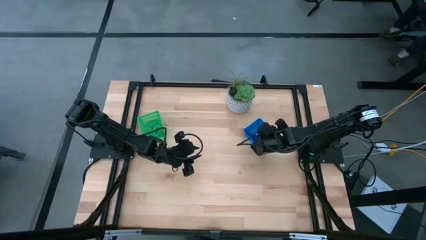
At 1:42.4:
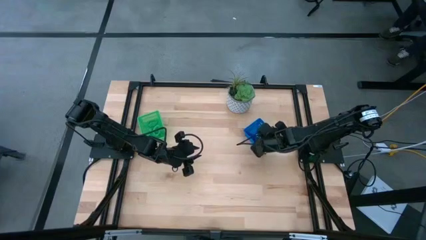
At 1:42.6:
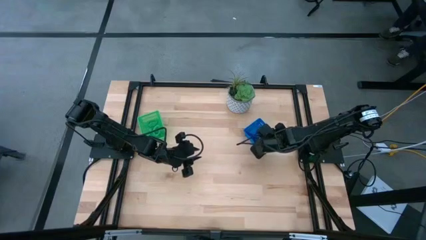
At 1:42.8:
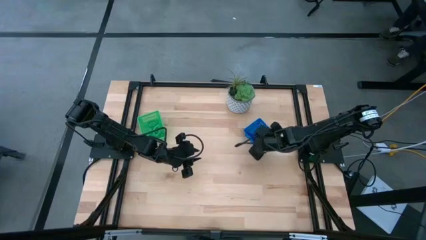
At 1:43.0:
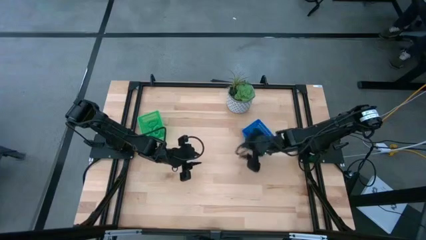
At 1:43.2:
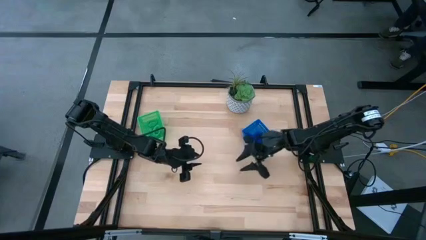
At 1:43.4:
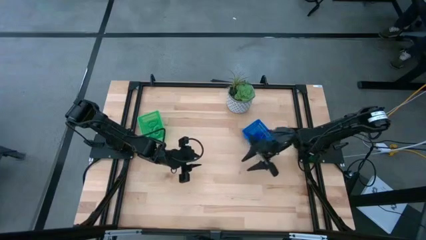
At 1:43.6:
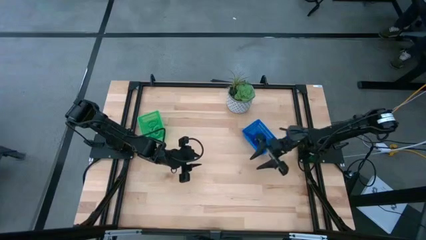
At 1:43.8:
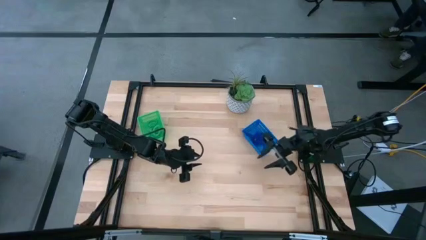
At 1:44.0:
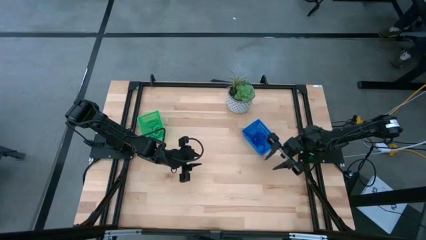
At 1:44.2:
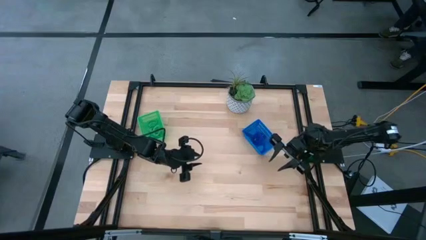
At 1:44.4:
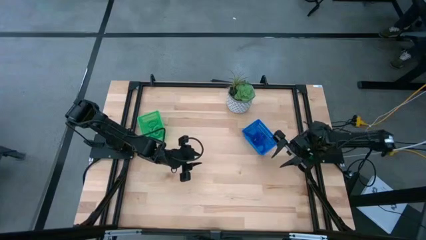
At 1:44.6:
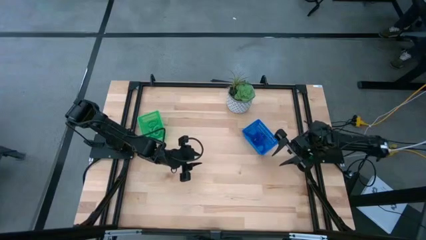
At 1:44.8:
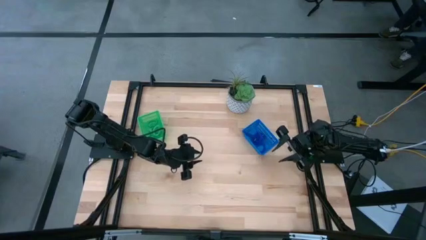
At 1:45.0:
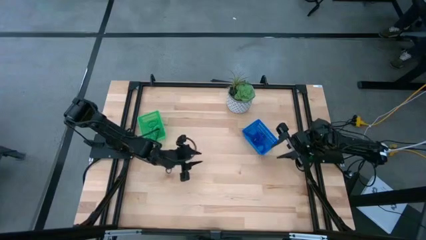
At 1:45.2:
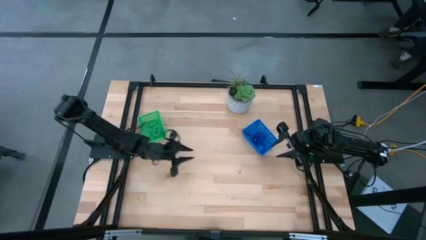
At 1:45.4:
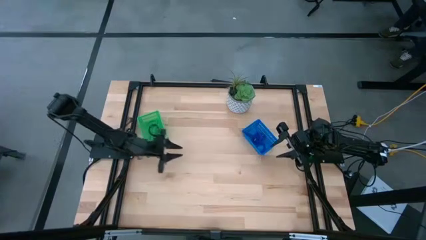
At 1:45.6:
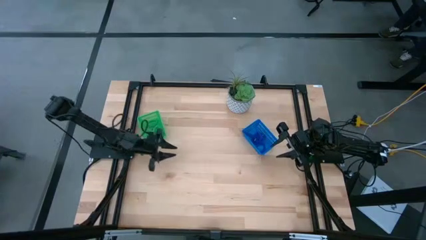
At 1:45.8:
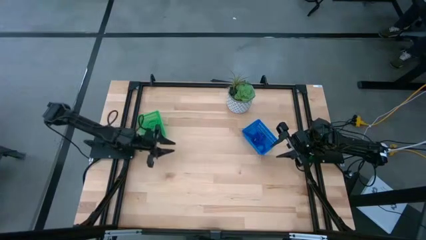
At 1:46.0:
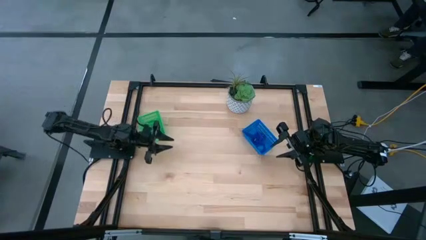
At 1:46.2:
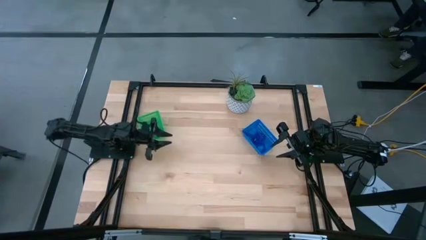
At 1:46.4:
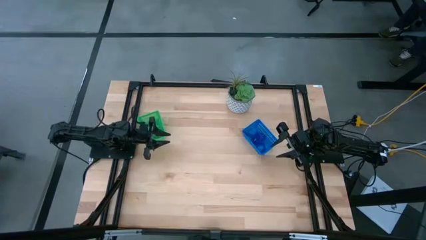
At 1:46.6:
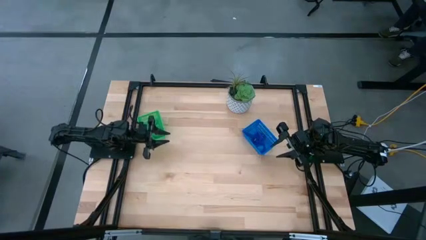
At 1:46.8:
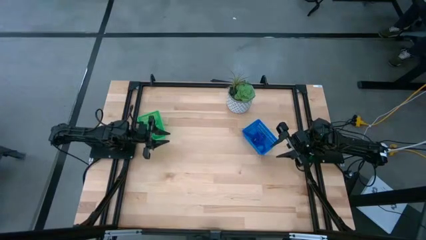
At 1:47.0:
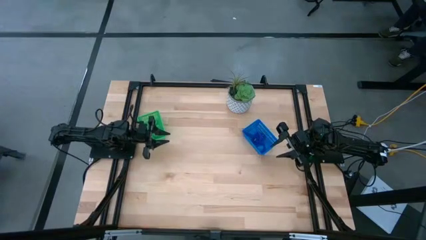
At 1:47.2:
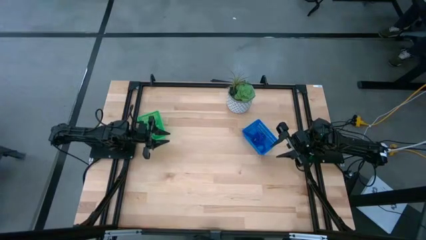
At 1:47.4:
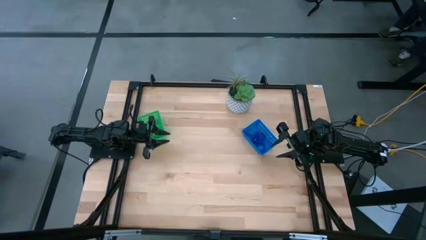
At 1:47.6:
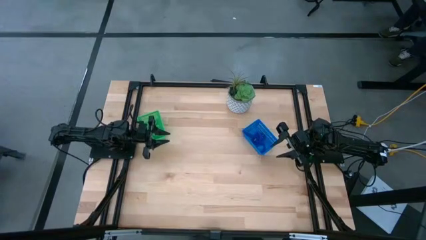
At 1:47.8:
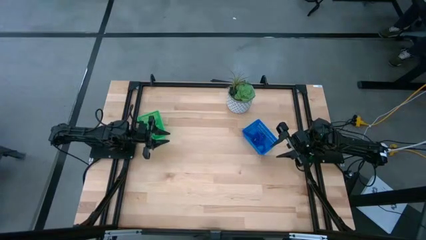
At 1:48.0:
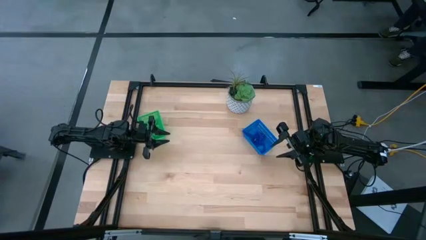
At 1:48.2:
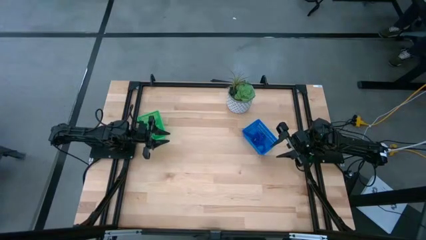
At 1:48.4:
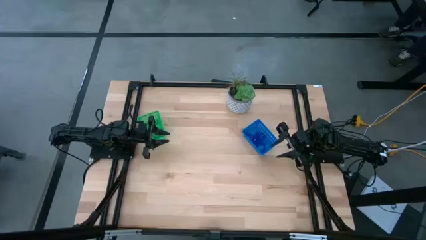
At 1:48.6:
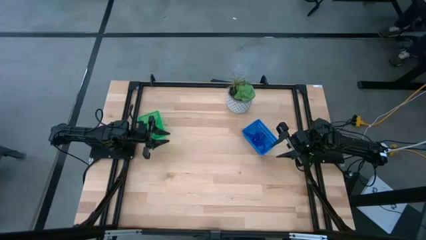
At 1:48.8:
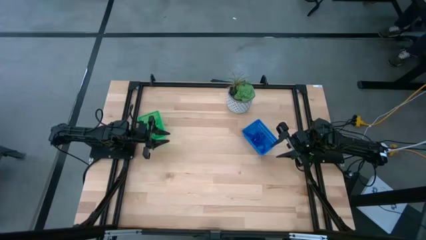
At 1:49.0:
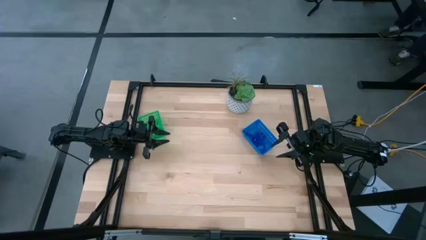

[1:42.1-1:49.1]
Task: Sort spring keychains
Return to Home Position

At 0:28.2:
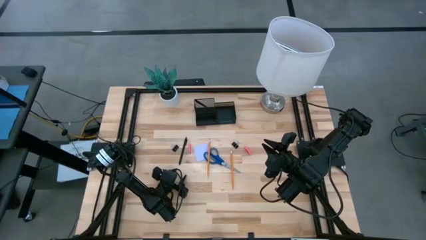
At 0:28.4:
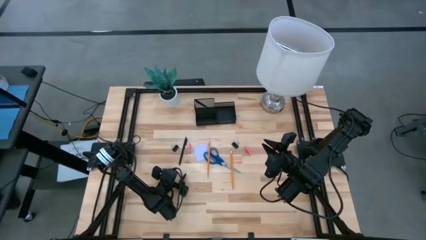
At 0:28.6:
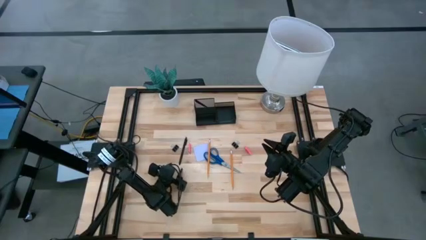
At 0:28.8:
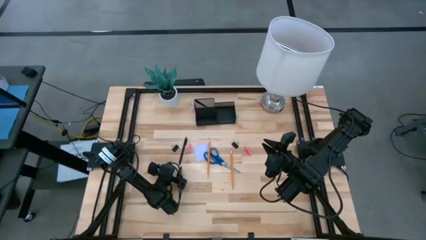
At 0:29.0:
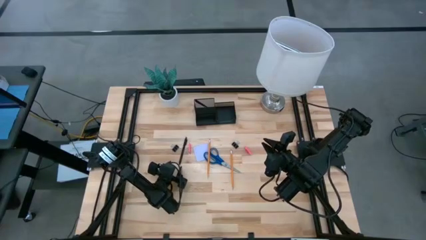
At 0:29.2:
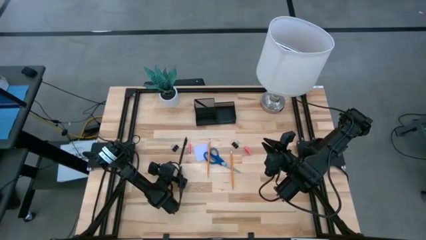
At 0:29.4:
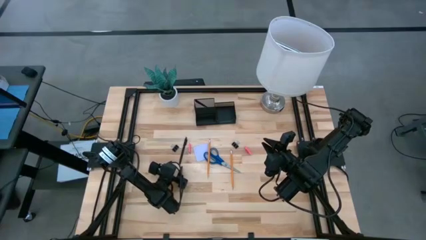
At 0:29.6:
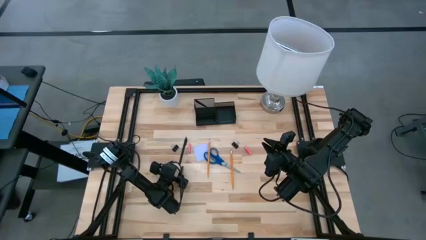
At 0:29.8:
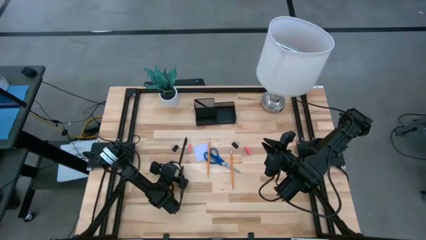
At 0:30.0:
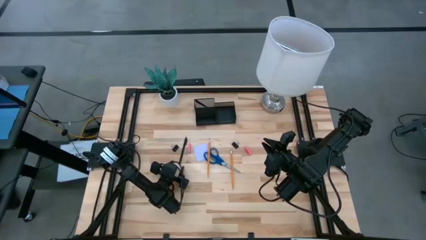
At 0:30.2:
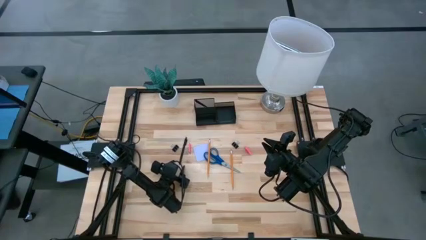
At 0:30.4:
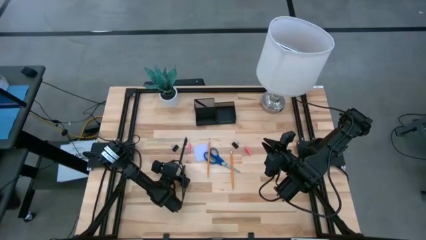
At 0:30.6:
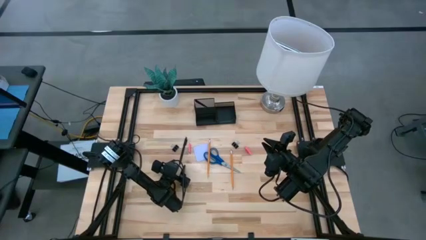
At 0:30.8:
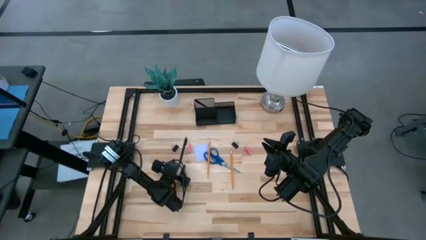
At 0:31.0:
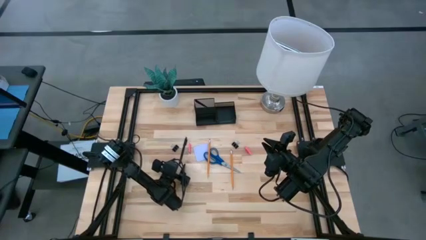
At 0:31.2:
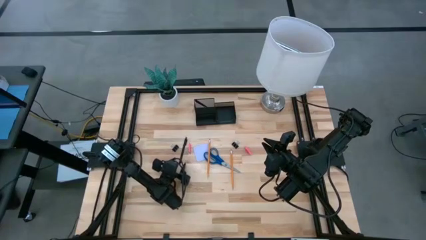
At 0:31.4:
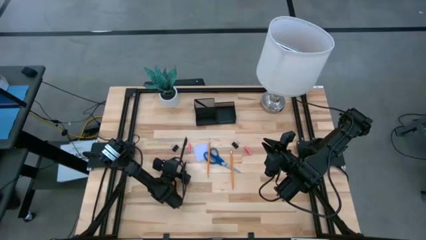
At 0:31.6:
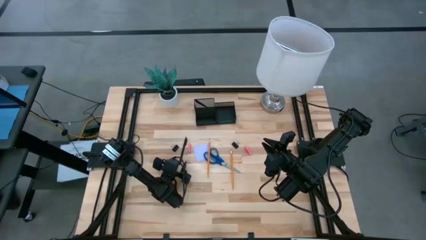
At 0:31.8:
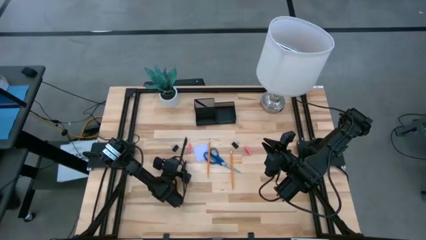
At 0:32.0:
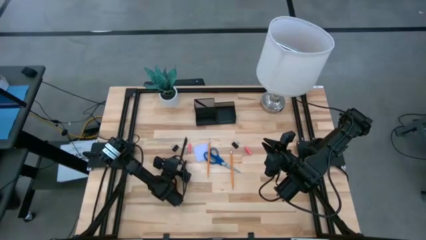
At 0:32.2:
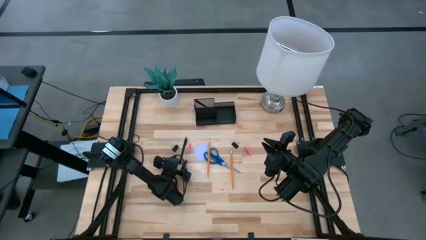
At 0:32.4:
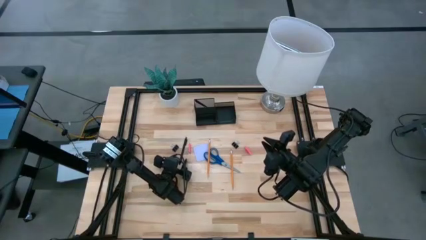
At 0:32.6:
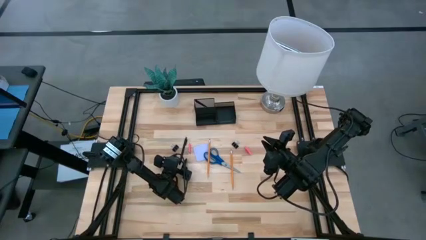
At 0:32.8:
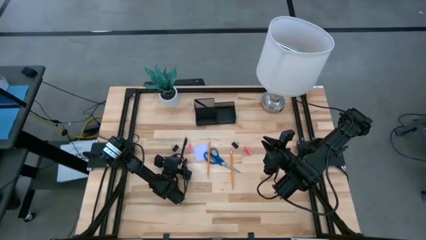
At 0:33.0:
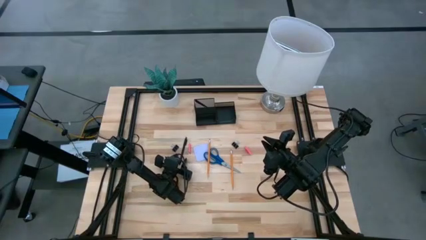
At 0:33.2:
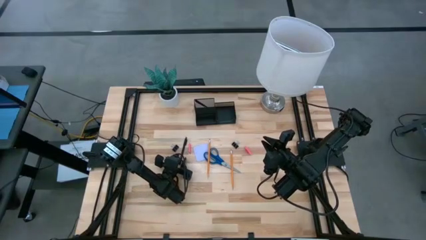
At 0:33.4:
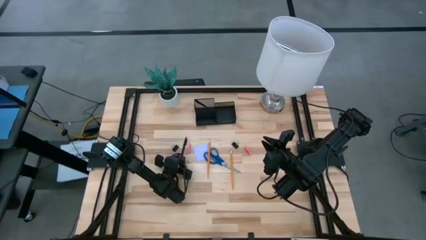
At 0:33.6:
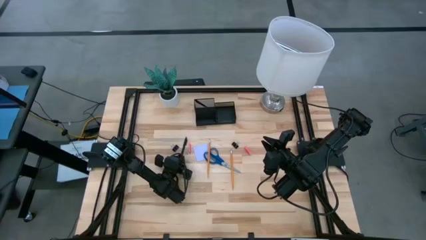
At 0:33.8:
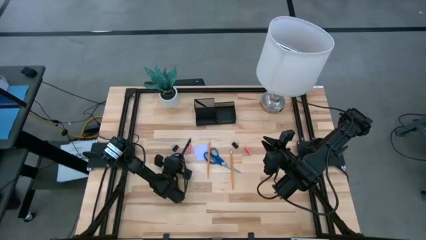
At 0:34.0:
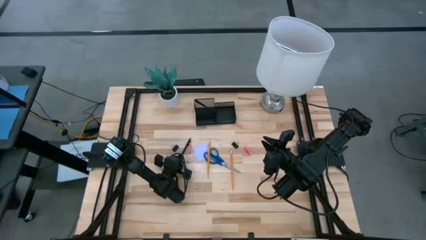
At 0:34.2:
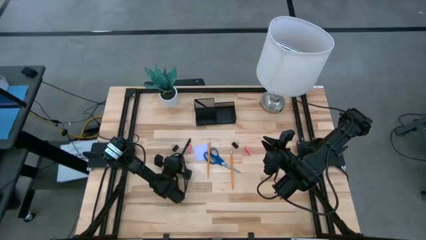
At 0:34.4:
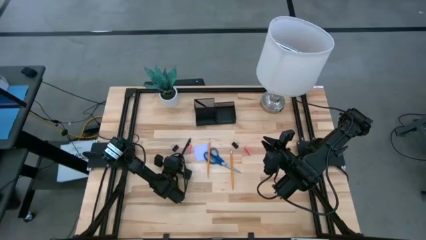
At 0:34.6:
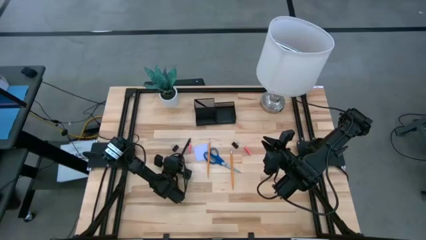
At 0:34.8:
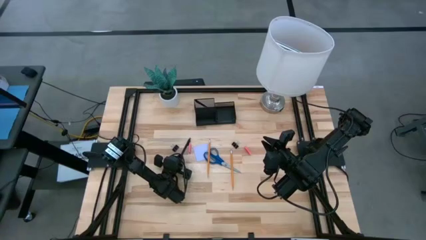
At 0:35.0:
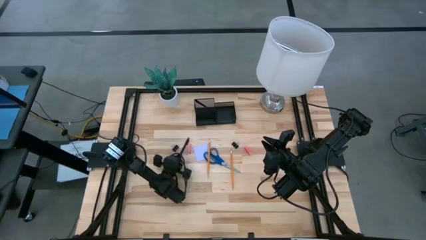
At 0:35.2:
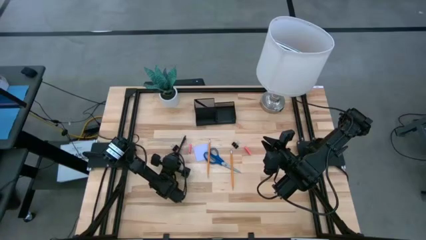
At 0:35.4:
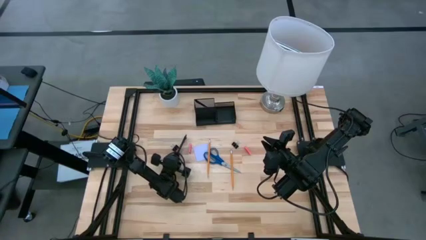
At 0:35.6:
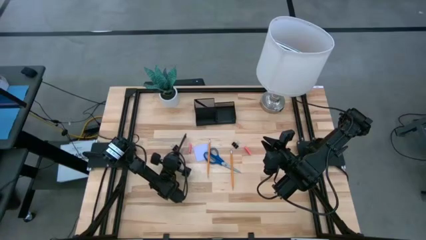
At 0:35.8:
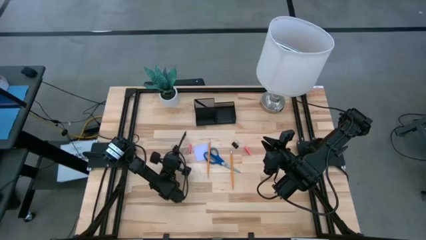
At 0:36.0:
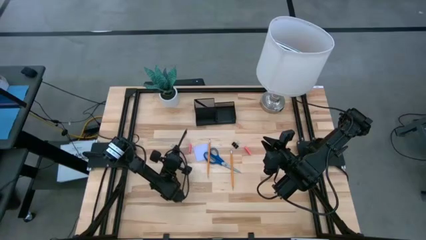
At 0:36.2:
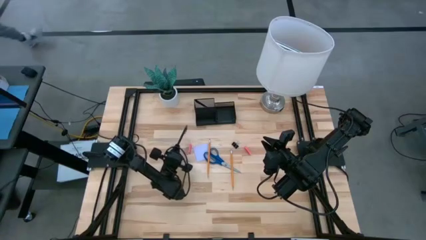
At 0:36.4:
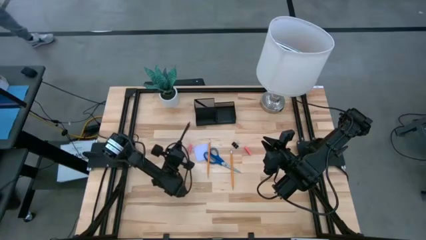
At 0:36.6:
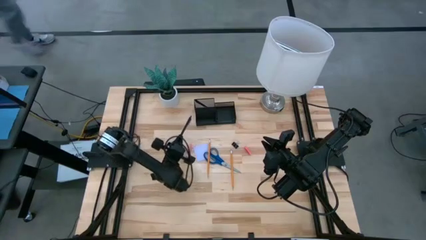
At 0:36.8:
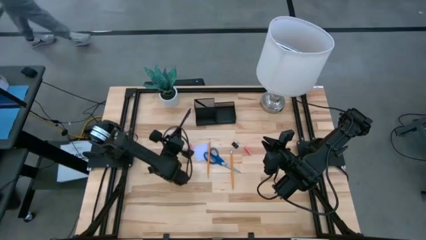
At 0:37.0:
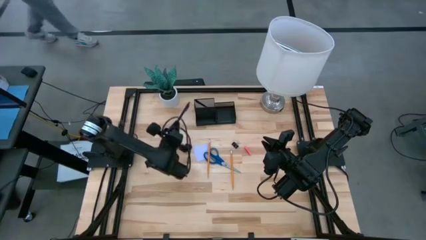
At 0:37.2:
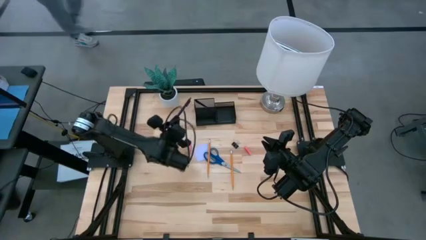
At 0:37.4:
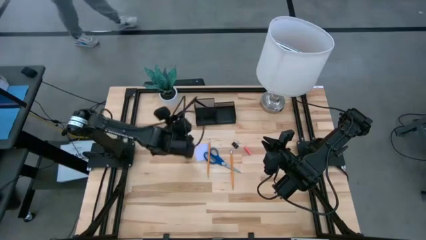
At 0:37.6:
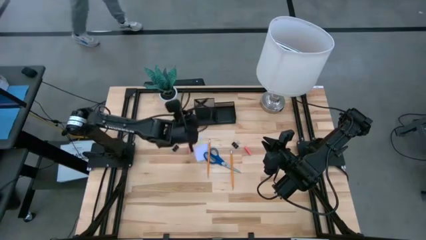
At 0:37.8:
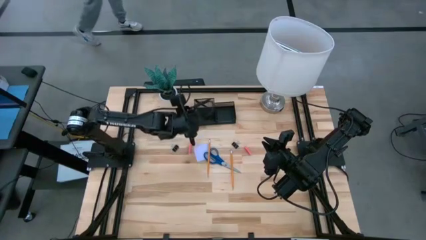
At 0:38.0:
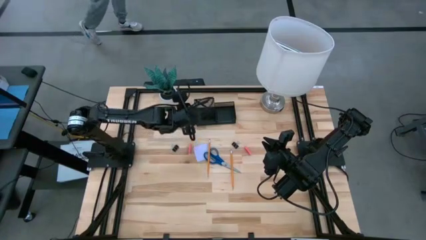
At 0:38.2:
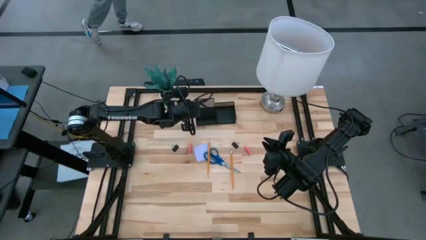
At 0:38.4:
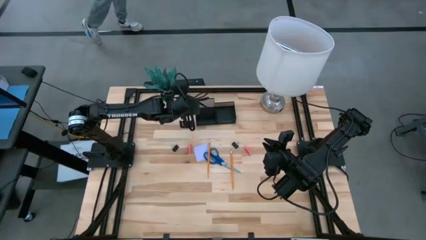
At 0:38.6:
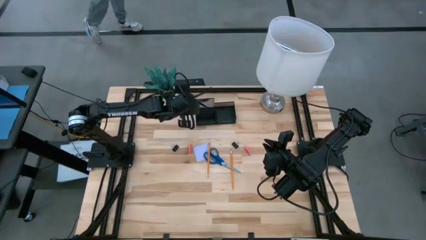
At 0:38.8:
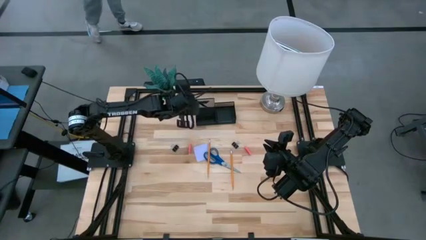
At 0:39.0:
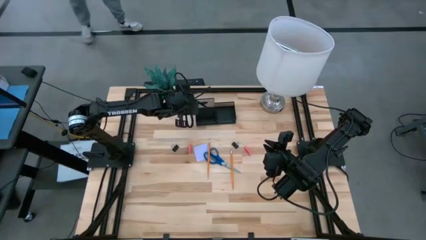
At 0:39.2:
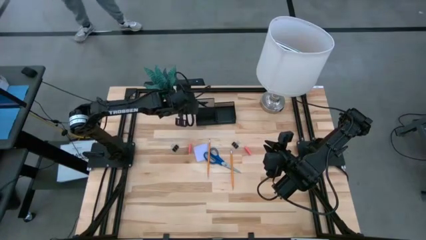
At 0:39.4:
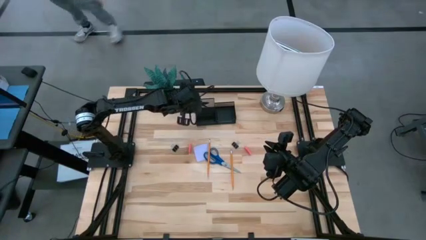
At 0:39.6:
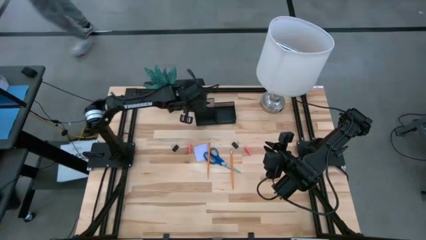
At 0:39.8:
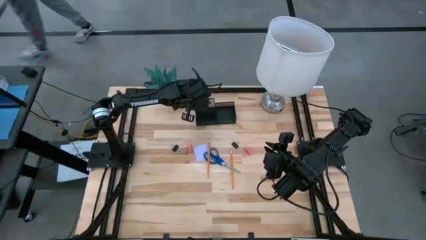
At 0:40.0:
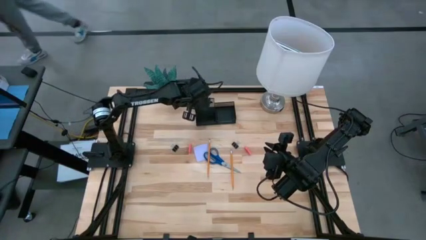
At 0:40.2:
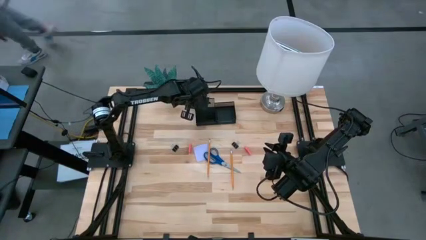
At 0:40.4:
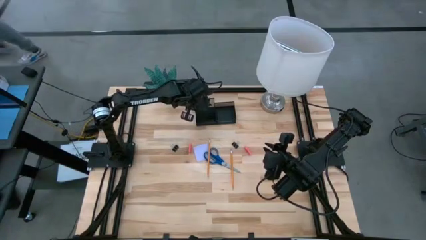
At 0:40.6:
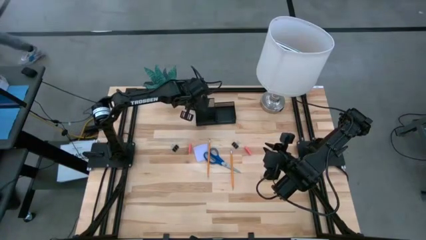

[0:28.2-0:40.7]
Task: Pick and place office supplies into organizer
Put the pen into the desk organizer
